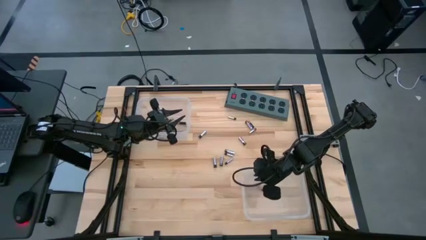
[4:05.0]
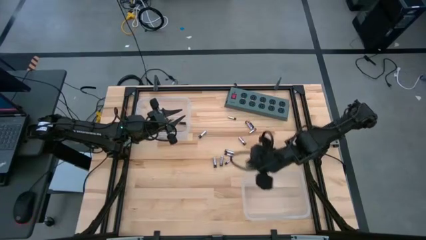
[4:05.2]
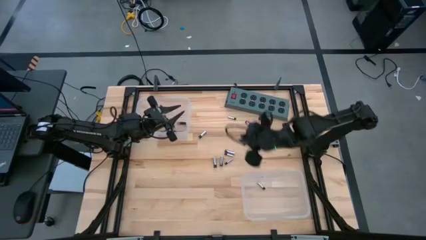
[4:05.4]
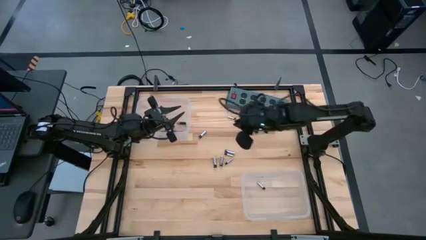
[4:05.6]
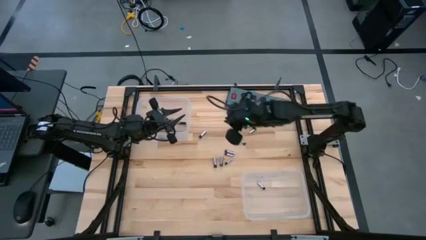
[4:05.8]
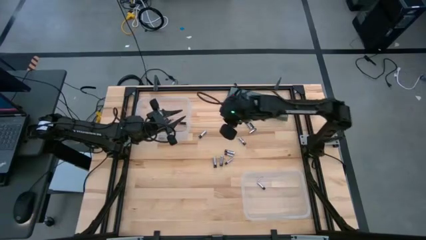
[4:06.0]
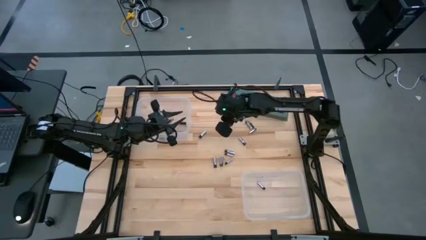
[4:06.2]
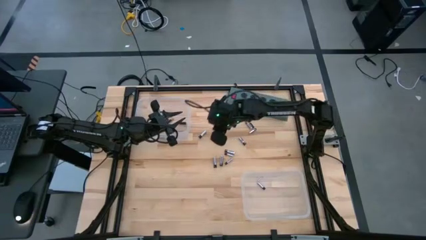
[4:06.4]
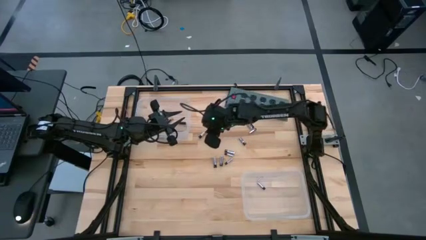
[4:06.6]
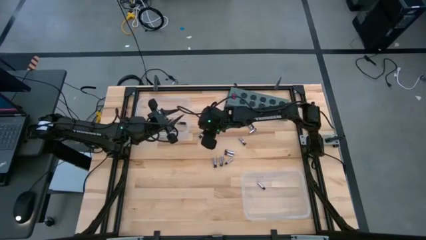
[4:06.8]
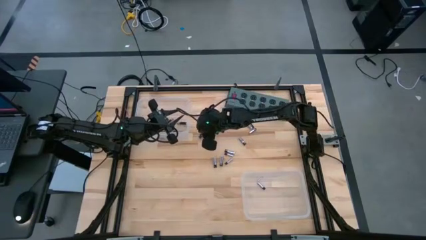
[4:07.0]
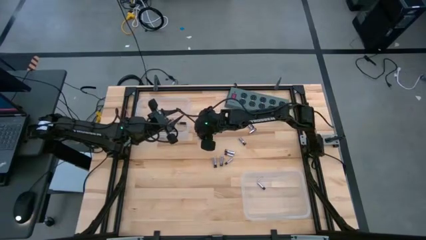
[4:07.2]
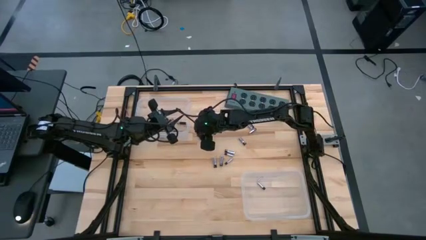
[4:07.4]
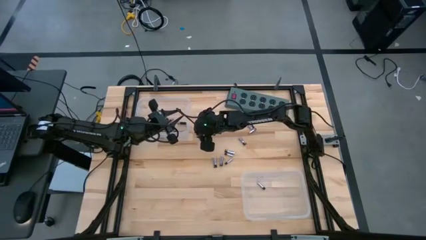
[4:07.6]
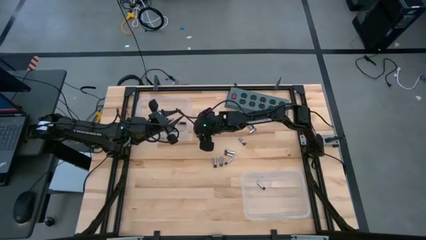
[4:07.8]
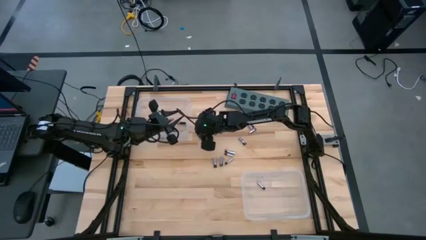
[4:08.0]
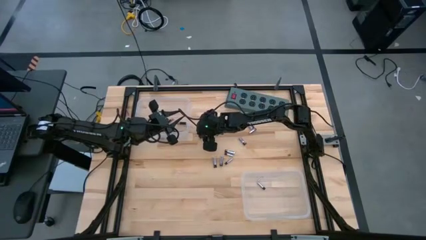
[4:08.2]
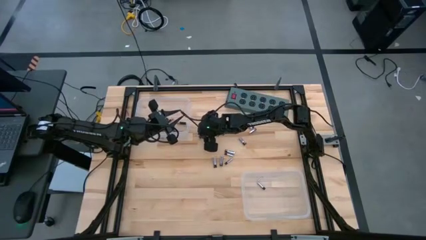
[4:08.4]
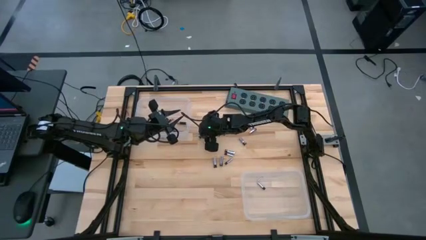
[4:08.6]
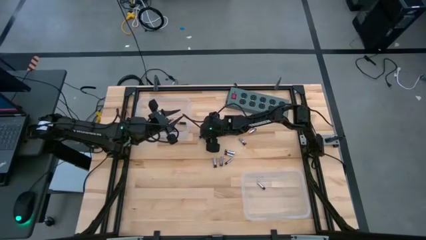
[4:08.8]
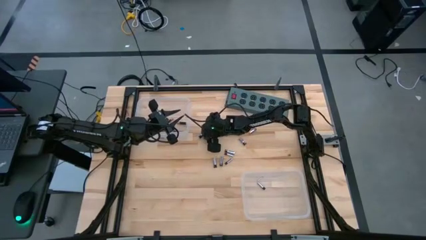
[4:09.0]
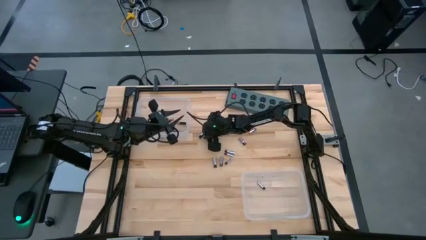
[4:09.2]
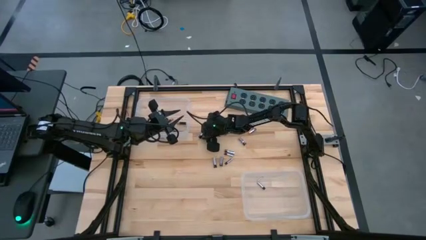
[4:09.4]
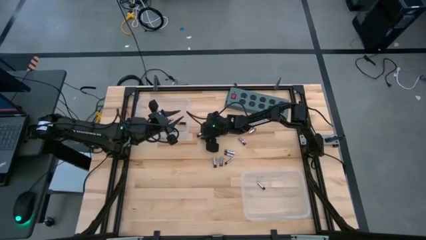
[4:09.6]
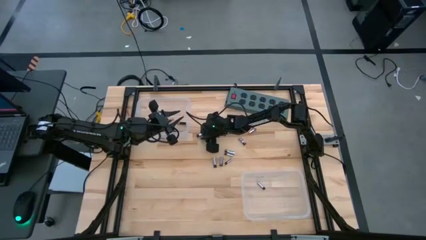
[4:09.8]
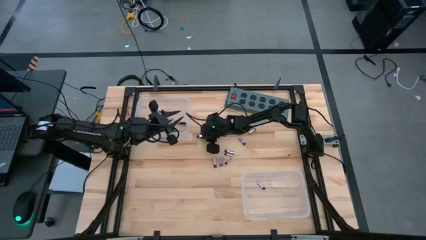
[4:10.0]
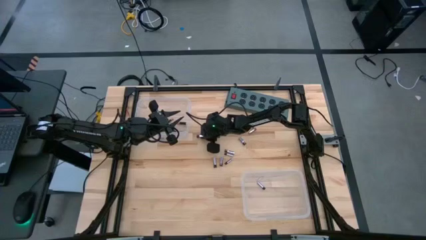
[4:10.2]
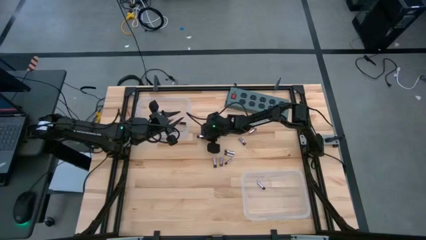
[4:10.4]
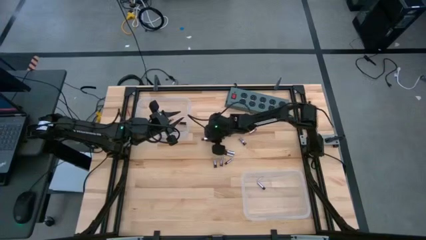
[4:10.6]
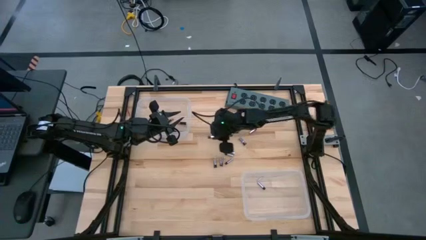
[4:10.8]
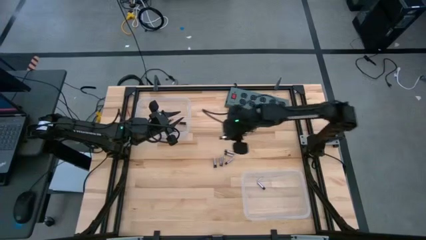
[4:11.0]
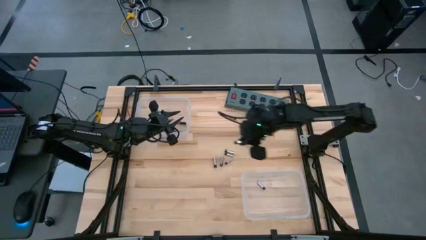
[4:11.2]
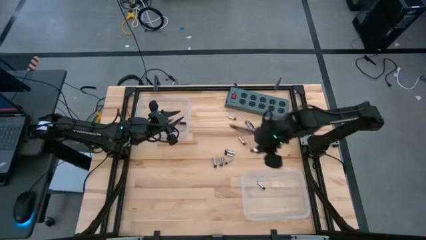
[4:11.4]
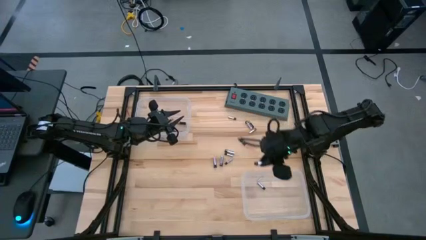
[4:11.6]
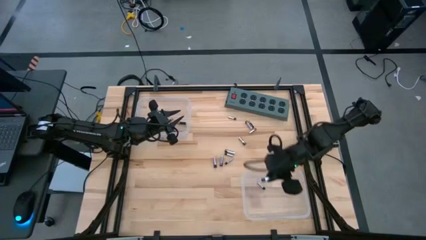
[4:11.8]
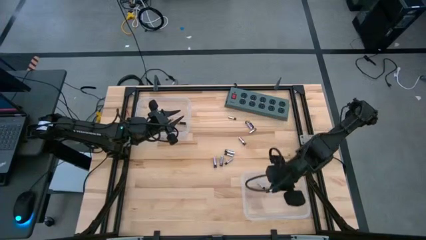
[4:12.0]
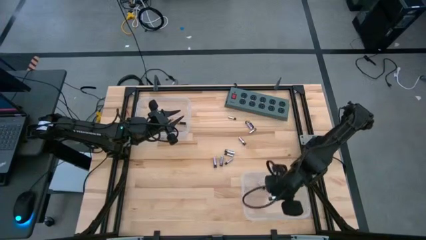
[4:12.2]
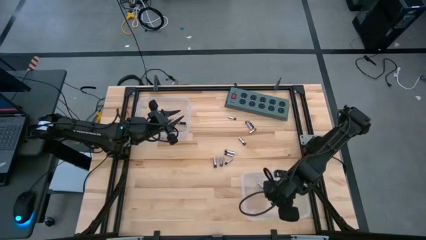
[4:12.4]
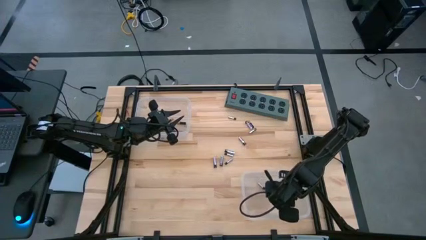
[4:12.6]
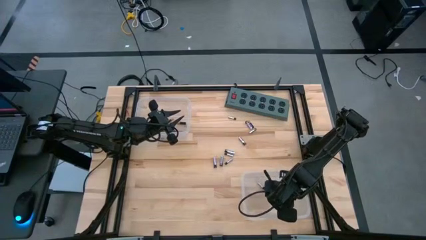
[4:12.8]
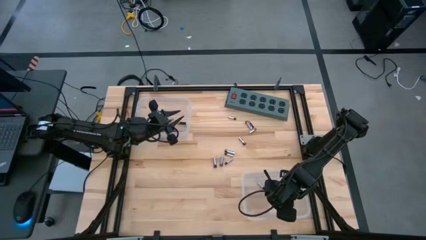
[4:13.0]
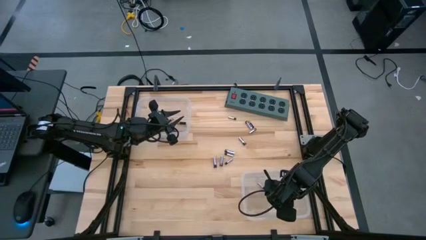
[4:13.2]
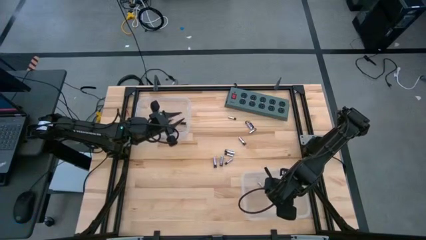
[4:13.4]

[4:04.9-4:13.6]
Task: Sort batteries
Put the silver battery into the bottom transparent bin

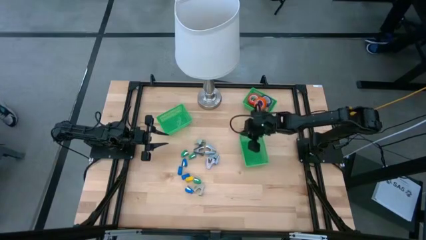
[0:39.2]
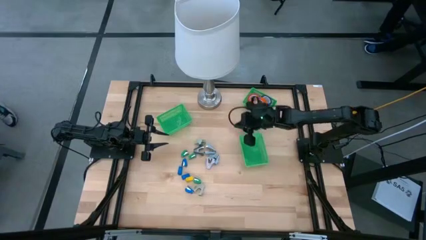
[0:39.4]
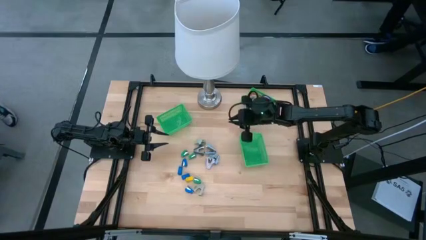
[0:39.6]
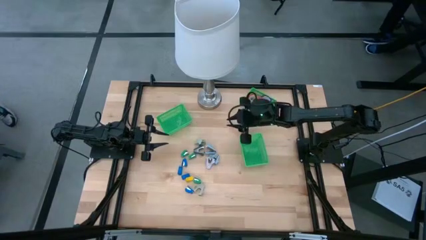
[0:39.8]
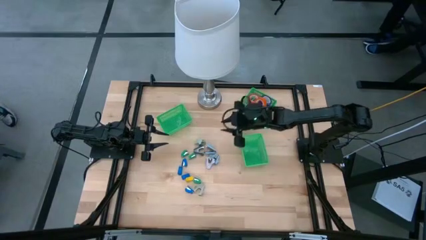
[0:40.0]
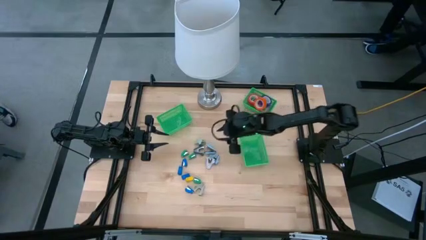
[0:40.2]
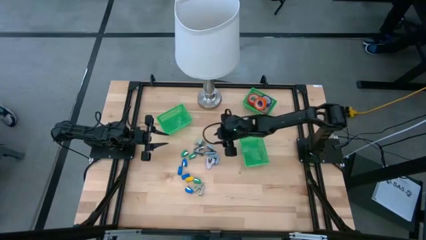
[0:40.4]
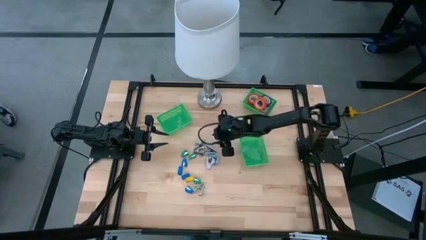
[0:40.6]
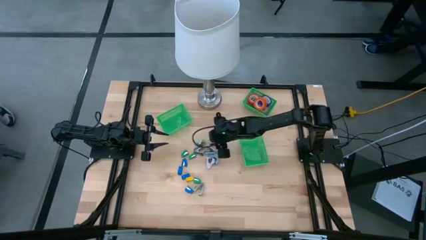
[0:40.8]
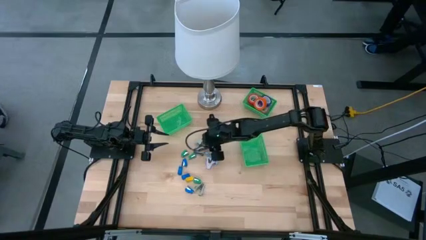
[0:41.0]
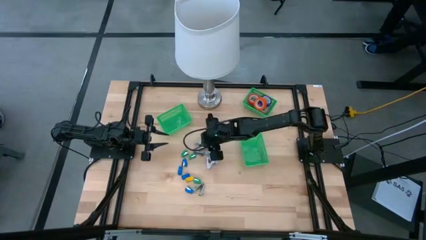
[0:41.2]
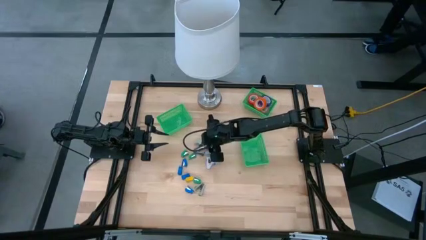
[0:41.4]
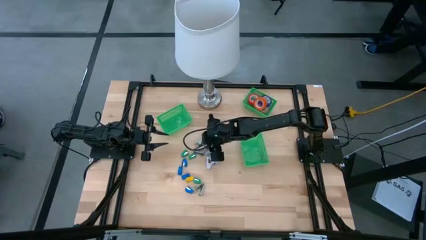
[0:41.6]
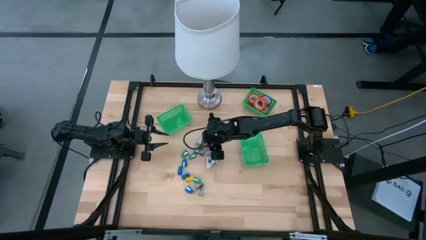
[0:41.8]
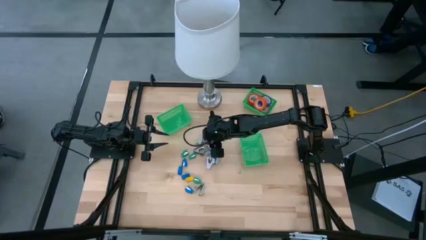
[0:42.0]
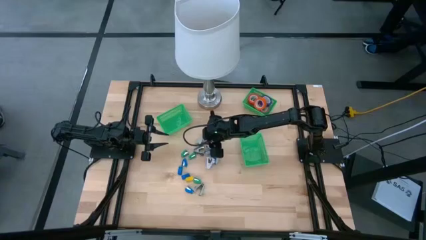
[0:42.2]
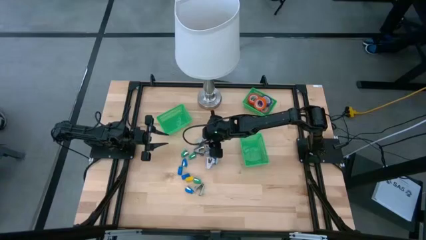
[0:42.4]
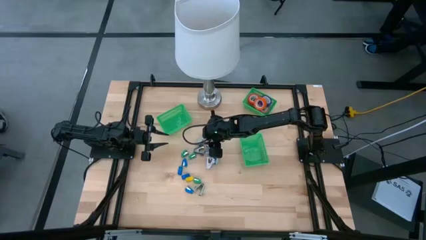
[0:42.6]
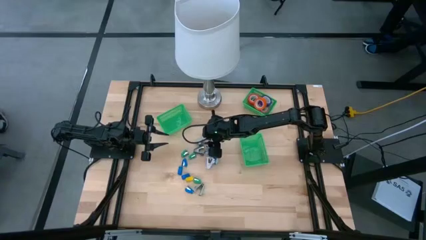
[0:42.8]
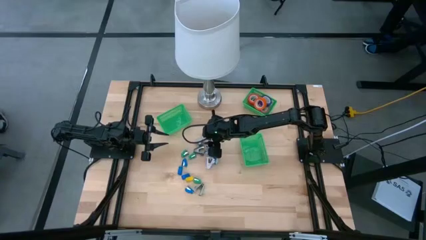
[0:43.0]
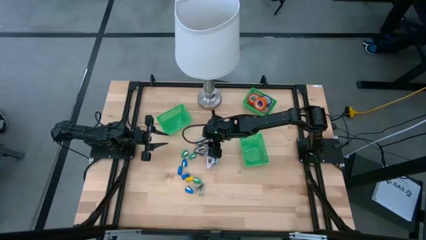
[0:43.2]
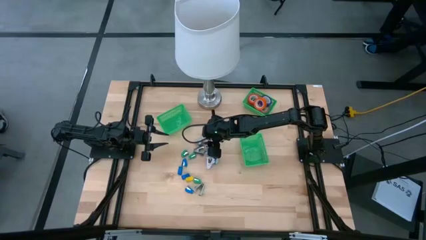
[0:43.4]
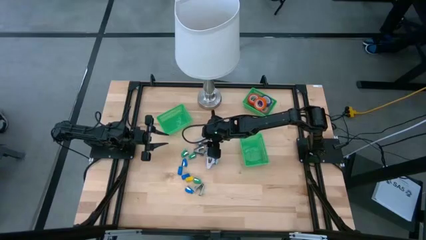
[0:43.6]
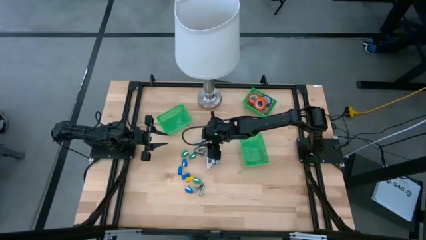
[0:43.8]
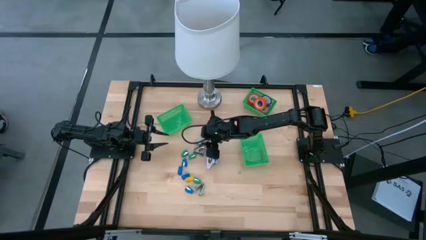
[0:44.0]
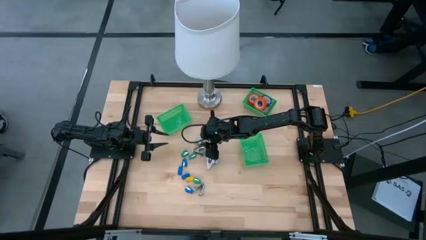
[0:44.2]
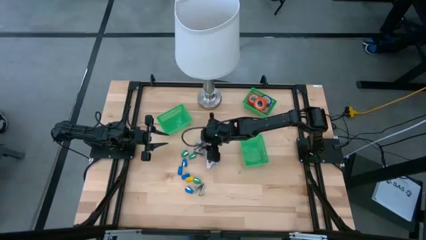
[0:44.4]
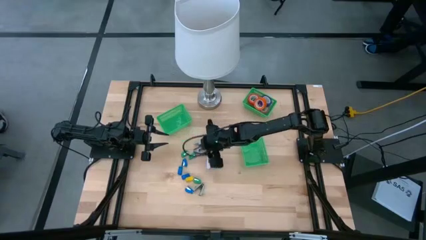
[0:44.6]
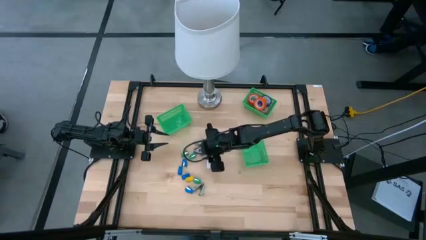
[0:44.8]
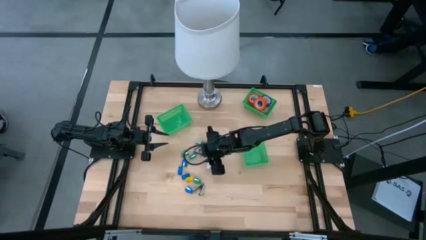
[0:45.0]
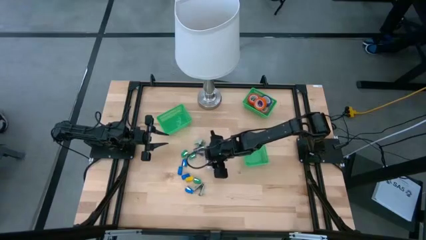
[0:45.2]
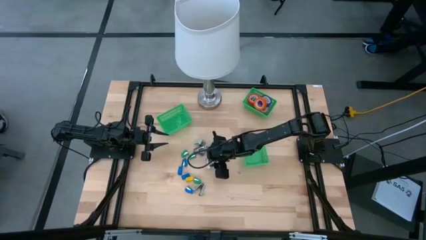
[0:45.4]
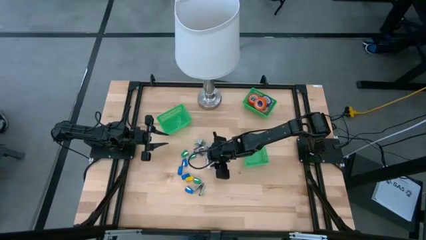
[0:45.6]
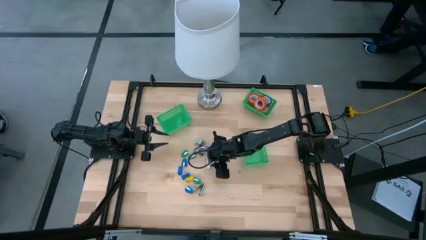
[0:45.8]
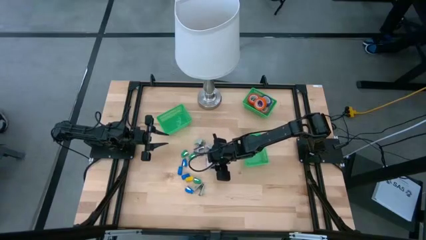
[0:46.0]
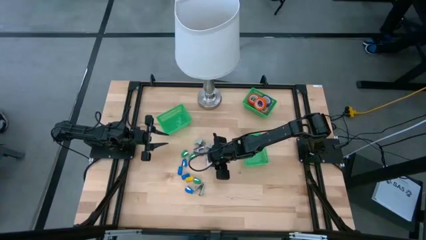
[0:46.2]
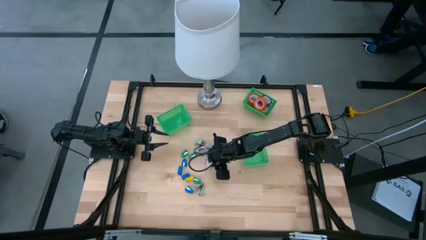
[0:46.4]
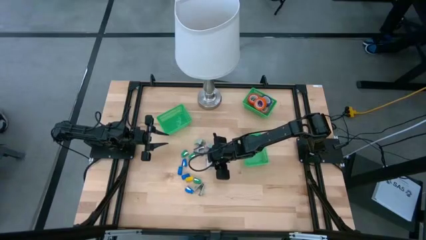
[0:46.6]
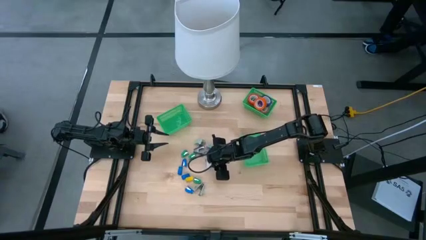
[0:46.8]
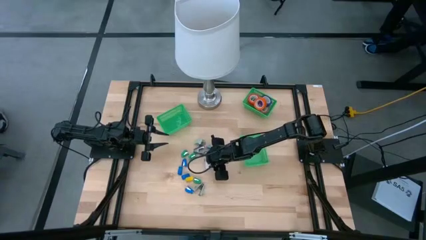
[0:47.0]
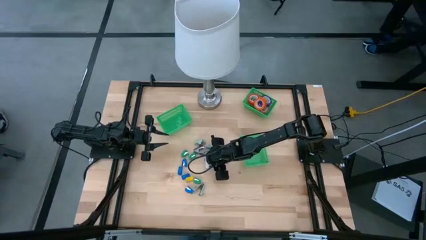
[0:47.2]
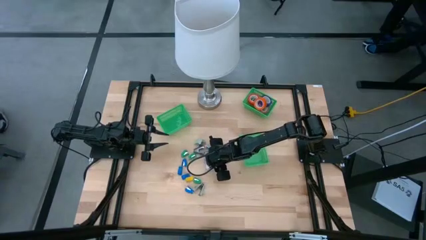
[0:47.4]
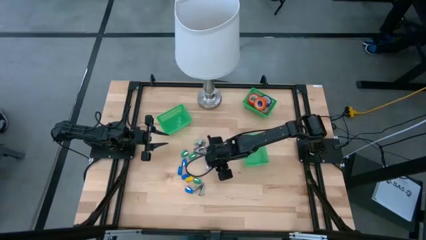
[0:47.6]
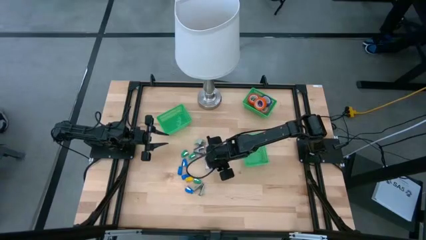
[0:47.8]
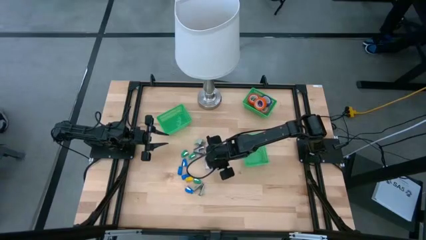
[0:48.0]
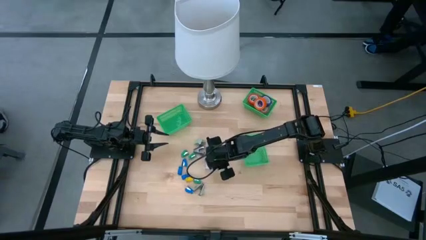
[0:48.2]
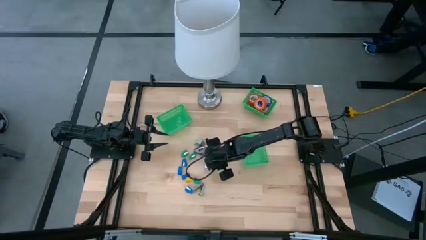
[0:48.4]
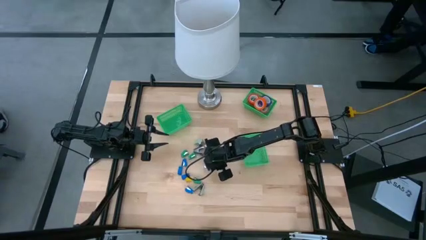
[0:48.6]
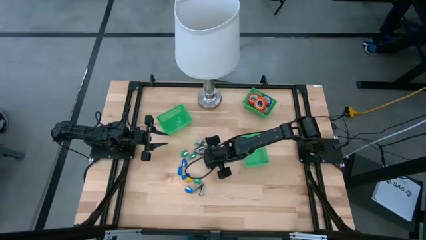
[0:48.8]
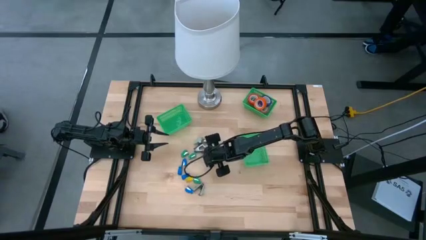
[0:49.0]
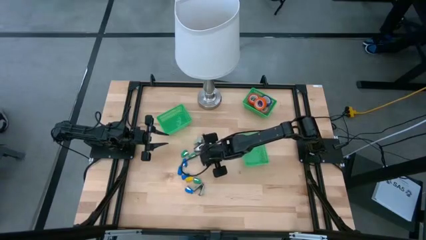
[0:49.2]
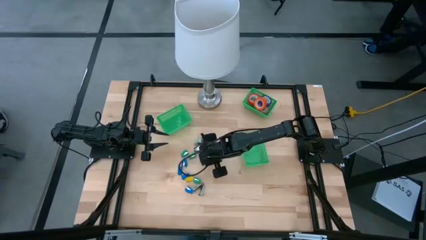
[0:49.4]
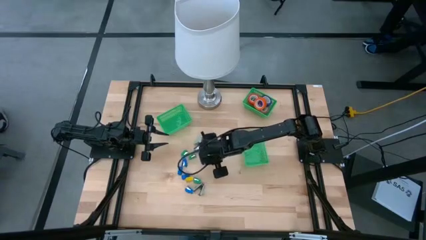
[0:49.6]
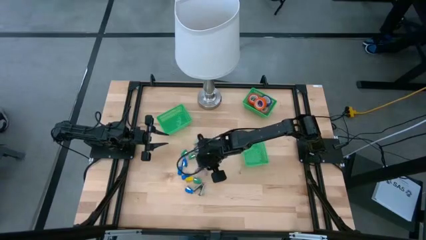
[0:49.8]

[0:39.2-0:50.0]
Task: Pick and place Stapler, Stapler remover, tape
Put the purple staple remover into the bottom right green bin
